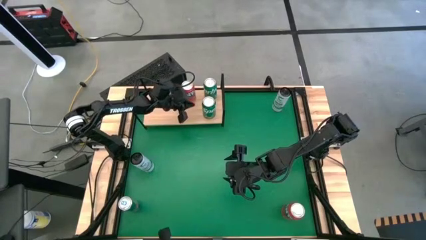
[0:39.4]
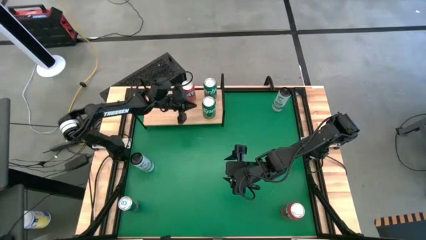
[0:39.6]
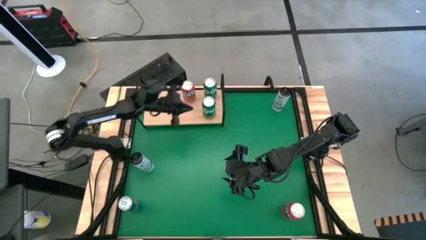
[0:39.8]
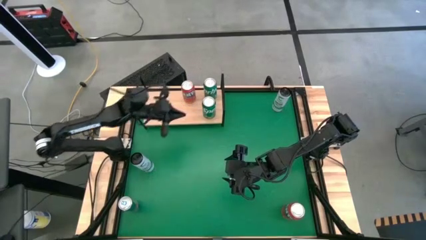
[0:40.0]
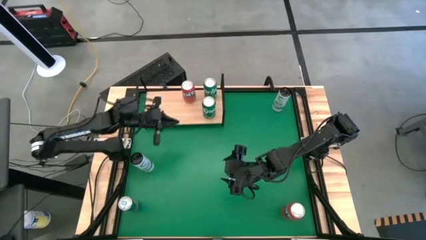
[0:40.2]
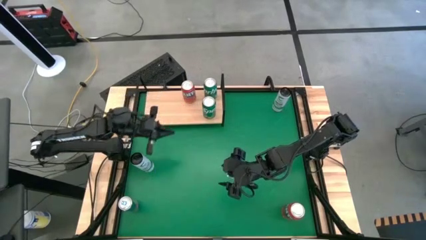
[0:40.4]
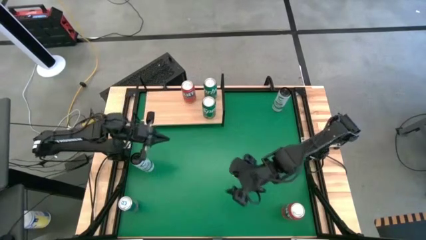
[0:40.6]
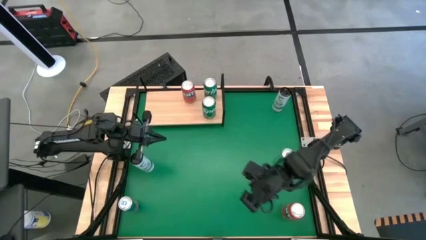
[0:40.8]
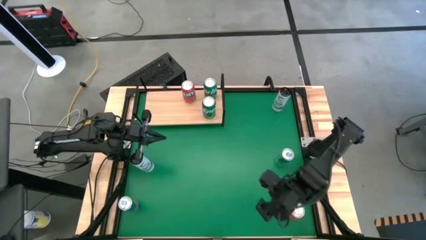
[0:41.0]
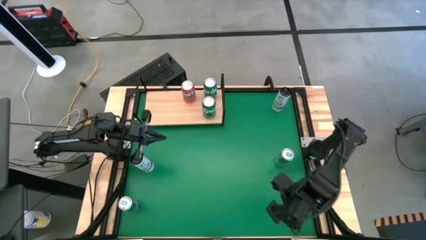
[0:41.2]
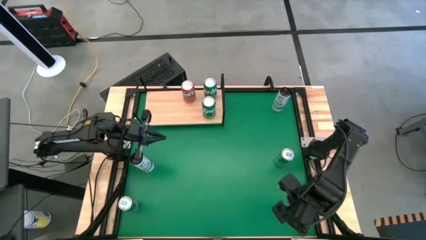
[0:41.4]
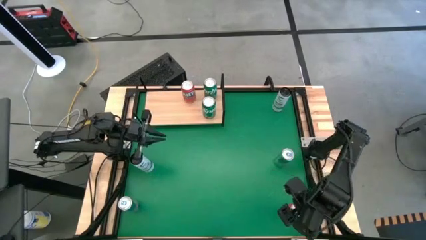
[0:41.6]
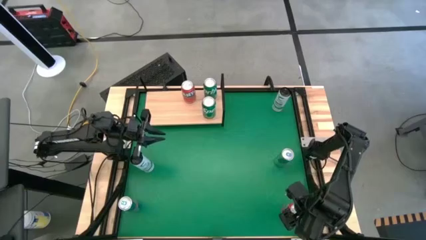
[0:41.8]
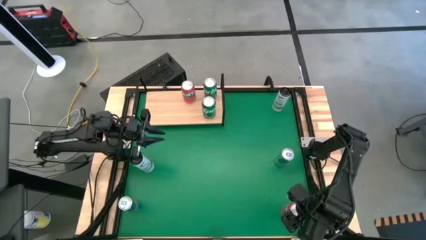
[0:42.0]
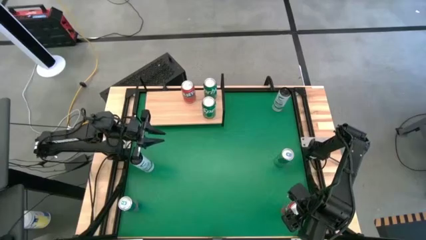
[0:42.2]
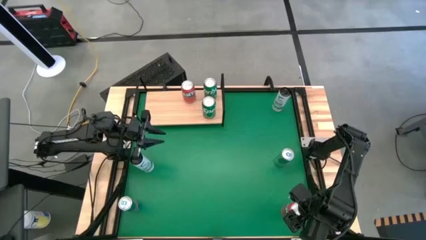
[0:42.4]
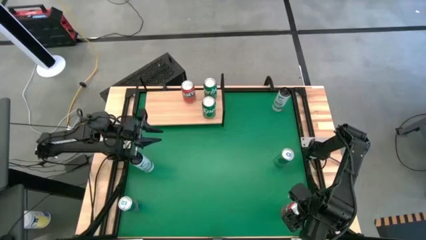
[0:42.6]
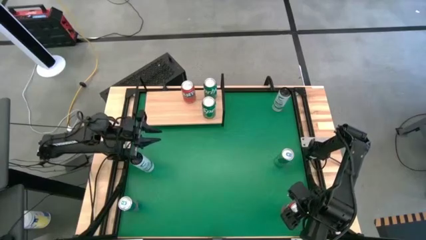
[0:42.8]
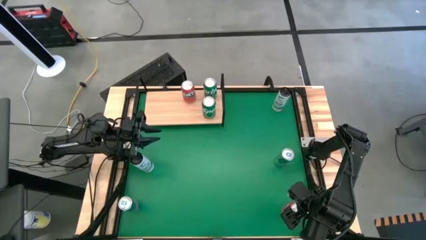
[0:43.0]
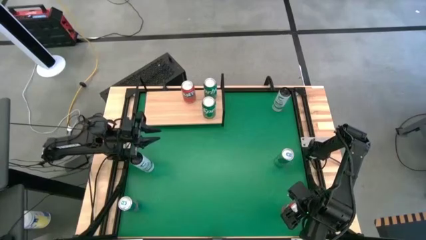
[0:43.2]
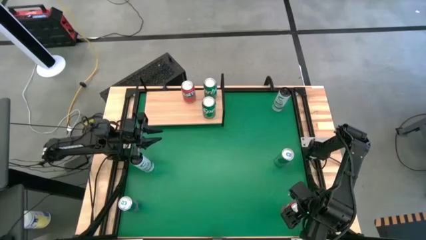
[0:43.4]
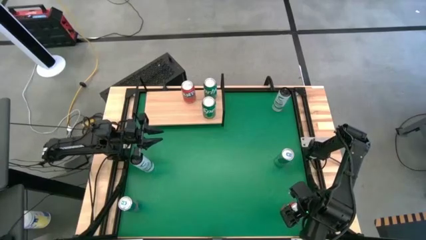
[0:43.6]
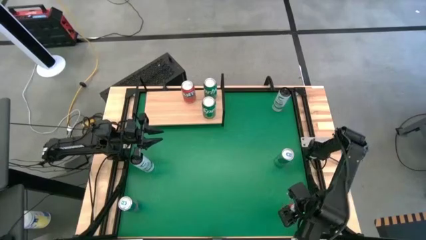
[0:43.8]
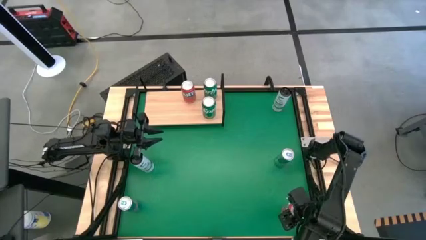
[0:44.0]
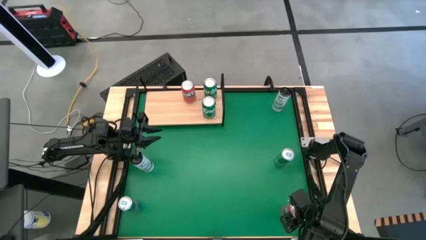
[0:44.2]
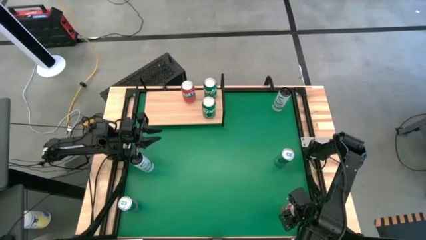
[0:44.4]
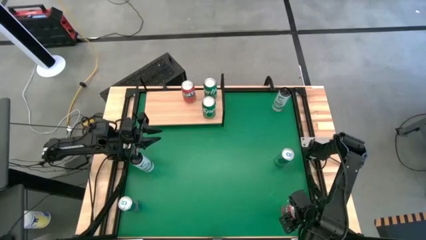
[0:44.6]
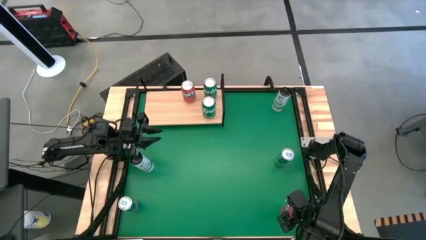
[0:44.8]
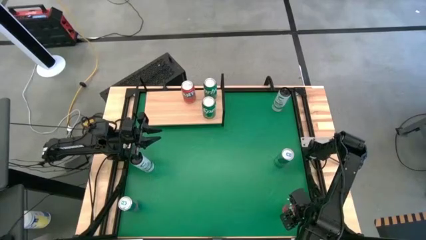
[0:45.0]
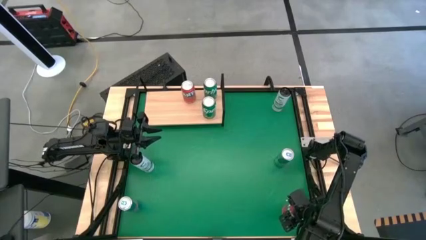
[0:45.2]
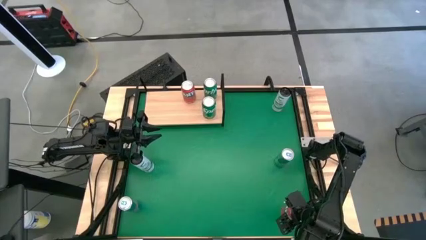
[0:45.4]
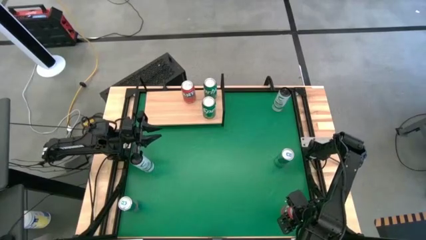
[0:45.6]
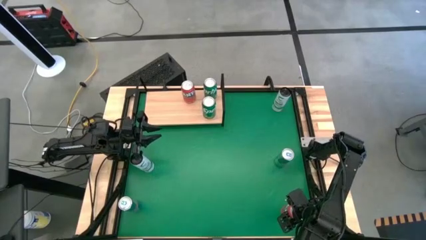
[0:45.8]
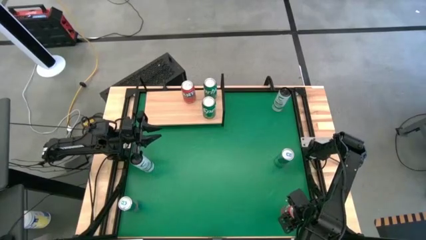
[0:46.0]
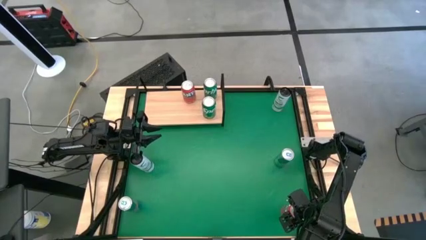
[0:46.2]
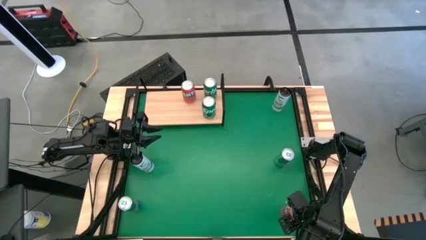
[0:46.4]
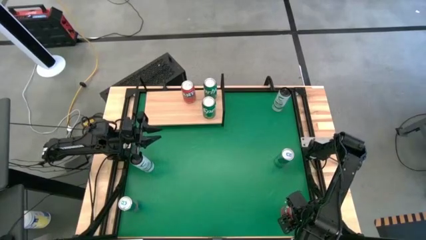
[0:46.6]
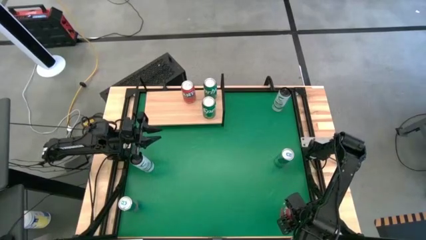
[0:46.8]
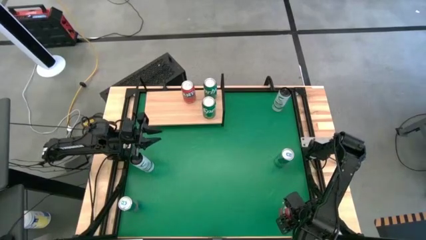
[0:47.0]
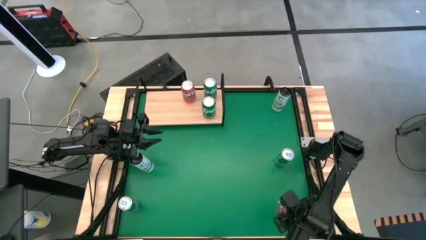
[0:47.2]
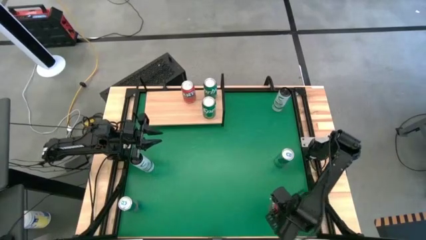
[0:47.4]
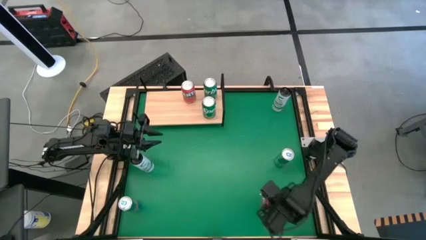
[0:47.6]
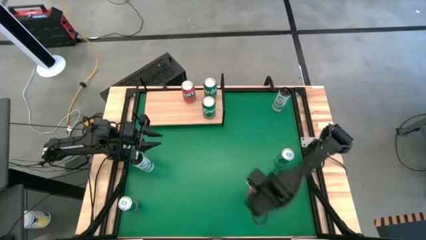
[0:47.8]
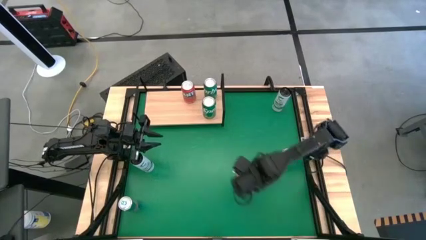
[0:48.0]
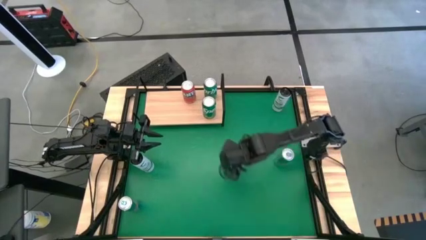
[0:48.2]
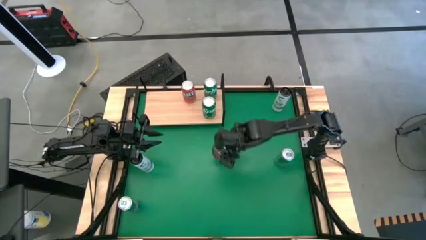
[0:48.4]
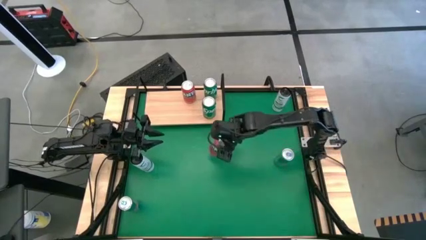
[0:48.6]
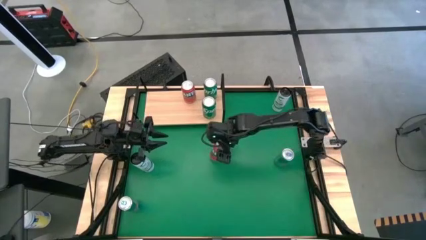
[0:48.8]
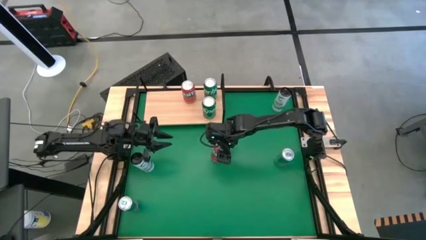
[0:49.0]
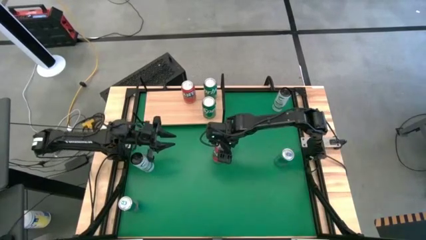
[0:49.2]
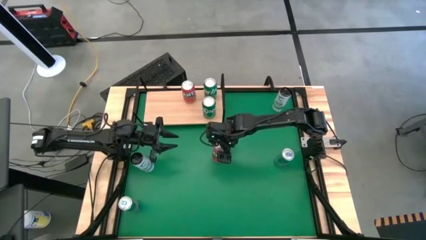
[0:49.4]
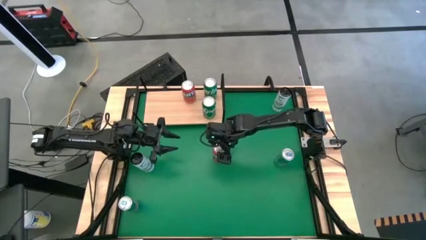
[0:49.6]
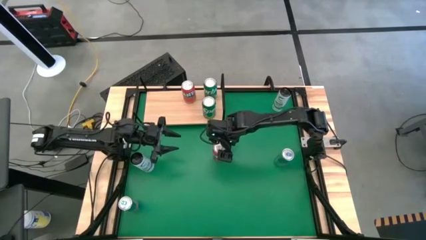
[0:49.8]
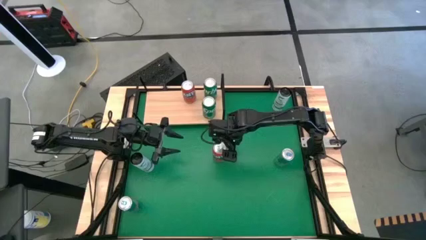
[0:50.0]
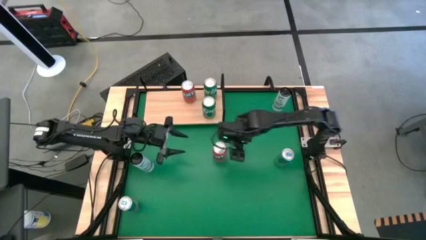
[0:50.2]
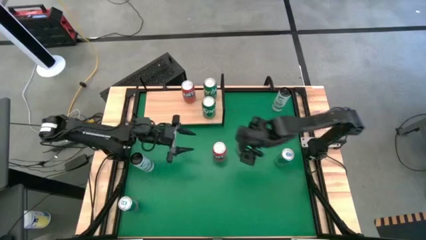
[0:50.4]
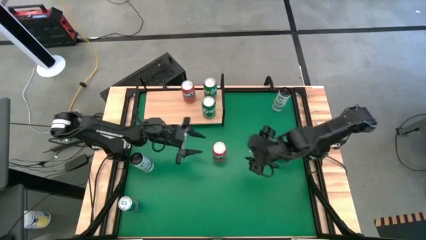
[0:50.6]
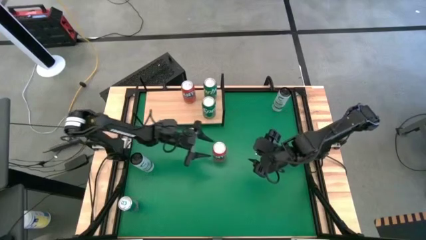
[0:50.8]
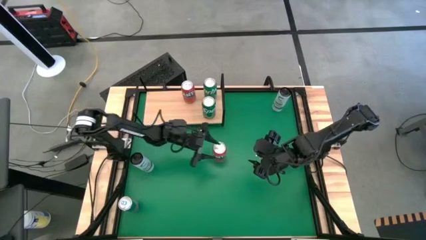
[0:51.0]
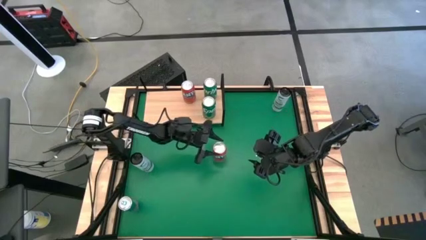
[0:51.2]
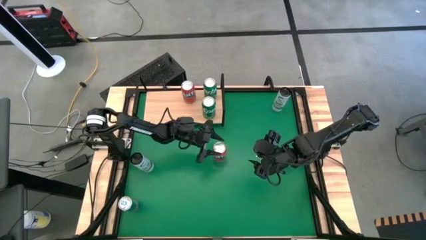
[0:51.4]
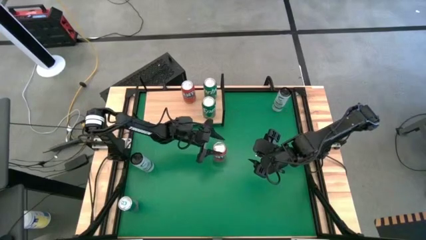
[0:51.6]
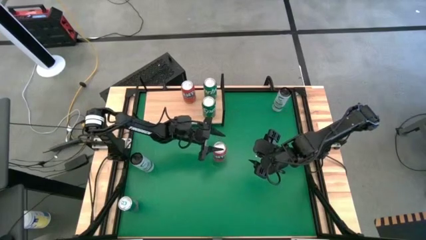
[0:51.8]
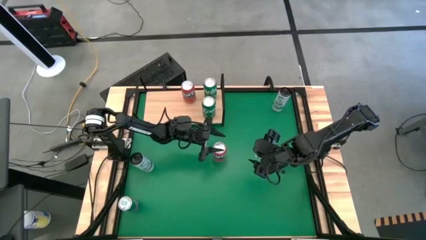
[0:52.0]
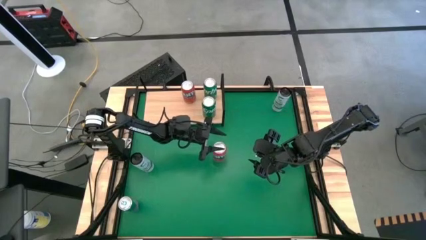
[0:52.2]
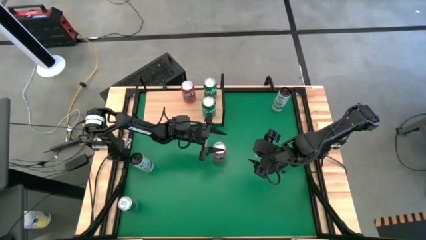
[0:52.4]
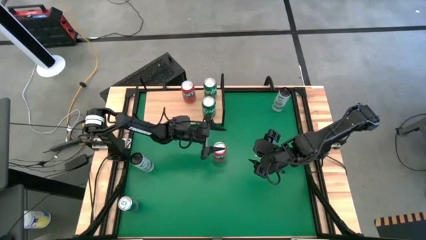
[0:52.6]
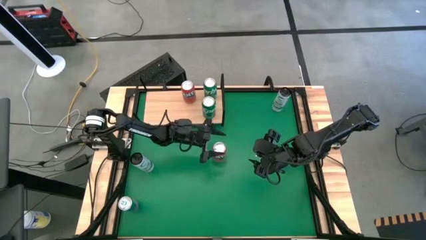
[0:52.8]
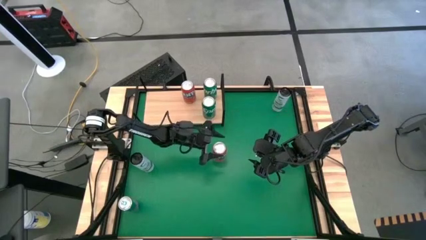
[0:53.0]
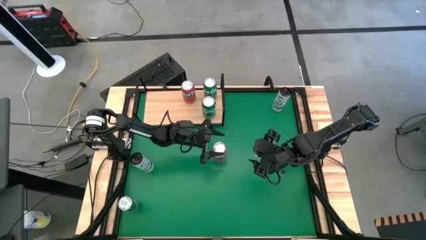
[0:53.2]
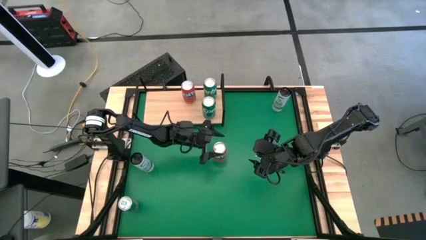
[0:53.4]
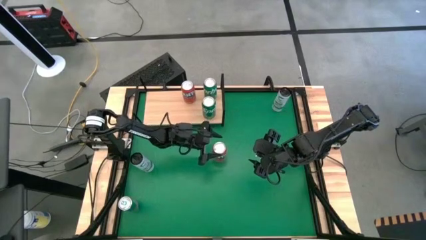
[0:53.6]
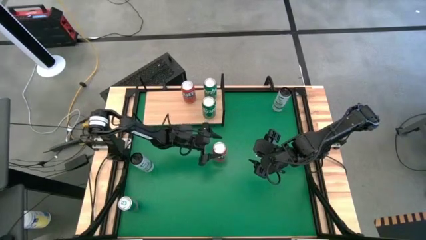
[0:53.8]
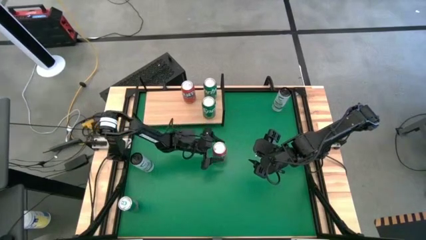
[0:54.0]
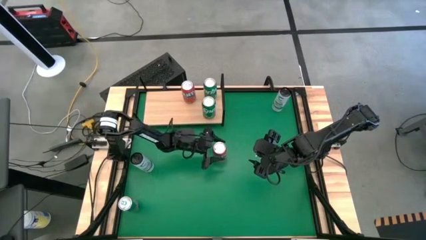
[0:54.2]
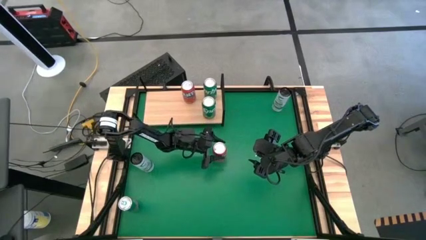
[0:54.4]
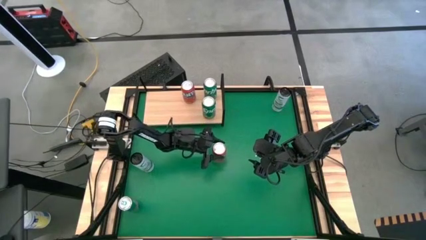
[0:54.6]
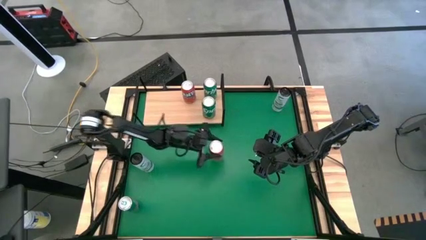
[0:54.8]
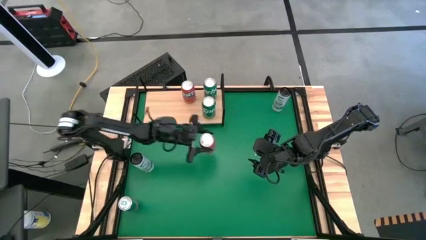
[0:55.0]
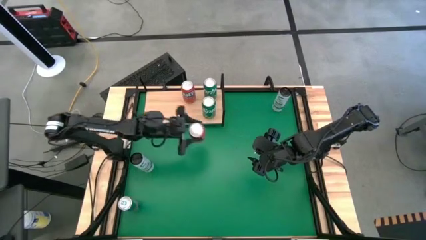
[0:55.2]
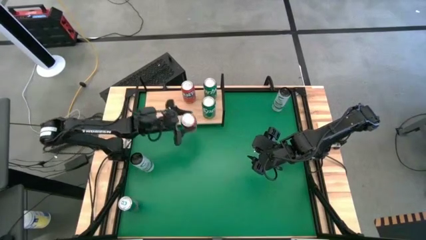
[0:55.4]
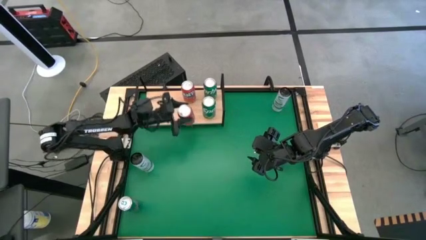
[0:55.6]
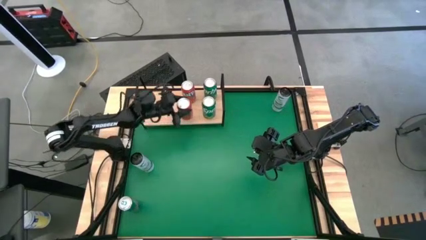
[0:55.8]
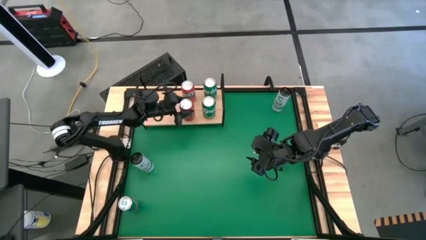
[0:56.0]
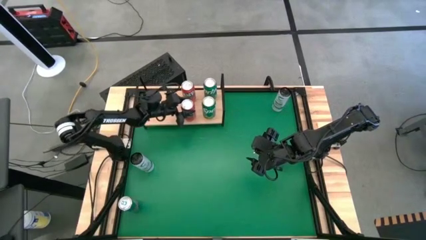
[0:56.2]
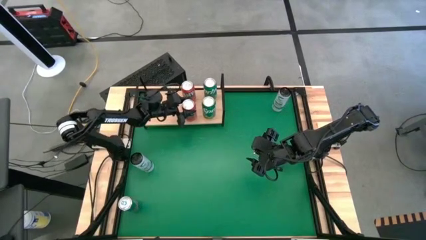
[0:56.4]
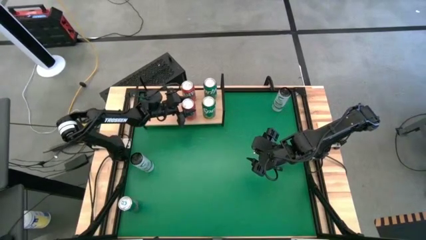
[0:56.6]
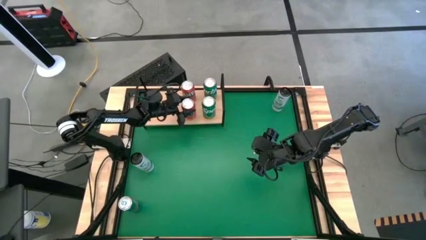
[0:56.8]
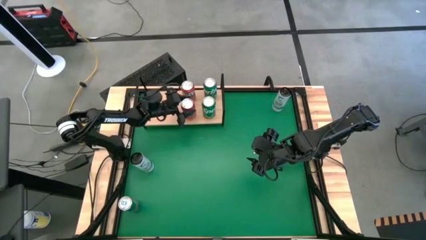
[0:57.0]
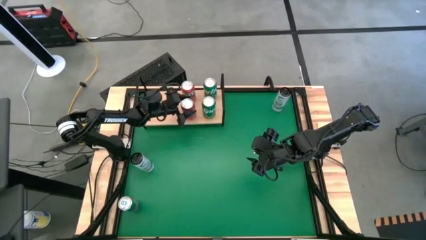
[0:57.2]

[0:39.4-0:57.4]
Task: Place canned beverage on shelf
Put the orange soda can aligned with the other orange soda can on the shelf
